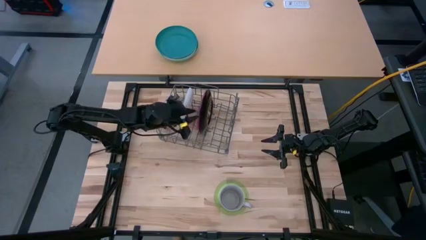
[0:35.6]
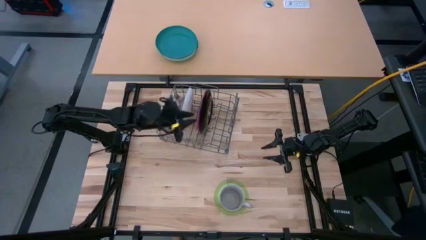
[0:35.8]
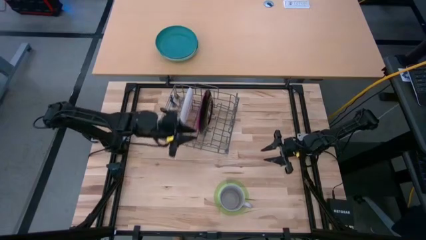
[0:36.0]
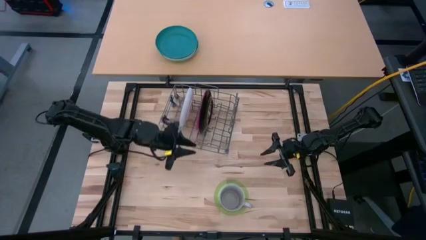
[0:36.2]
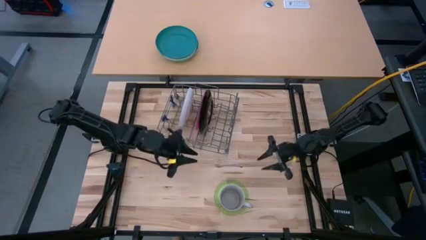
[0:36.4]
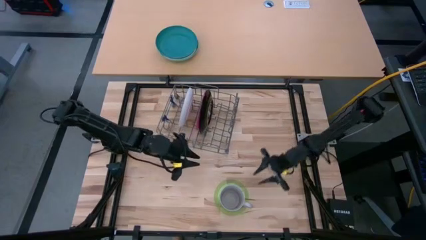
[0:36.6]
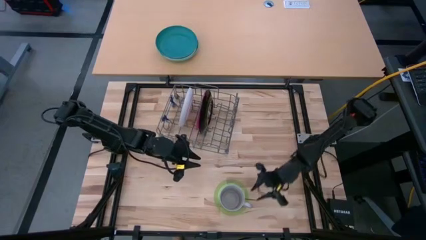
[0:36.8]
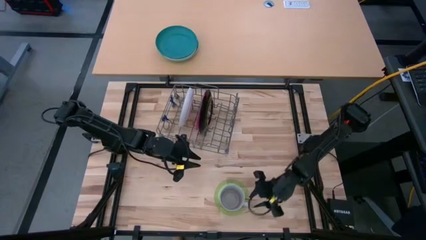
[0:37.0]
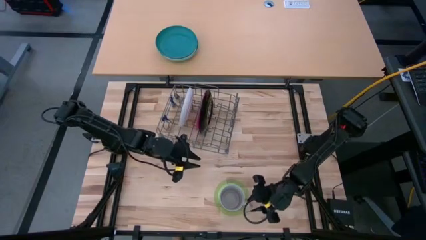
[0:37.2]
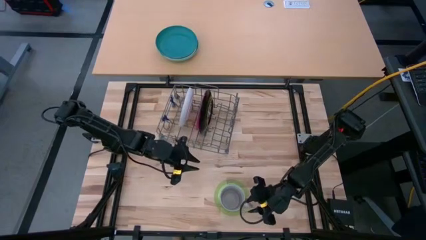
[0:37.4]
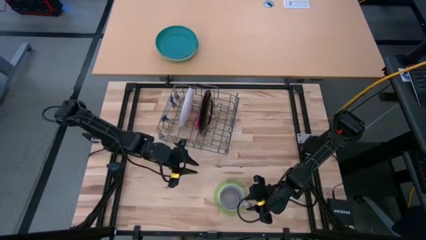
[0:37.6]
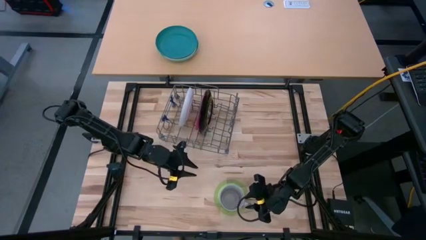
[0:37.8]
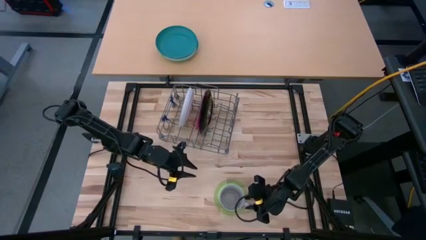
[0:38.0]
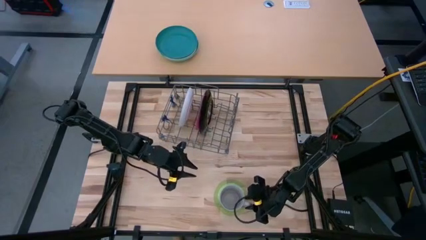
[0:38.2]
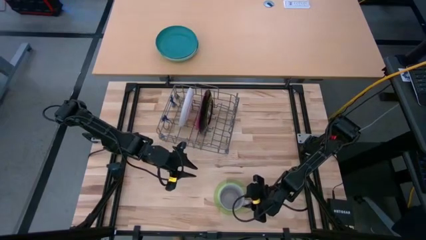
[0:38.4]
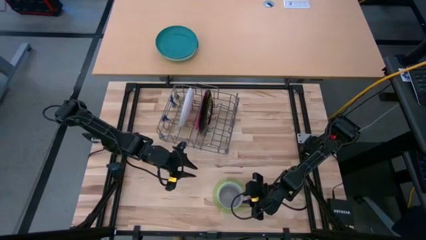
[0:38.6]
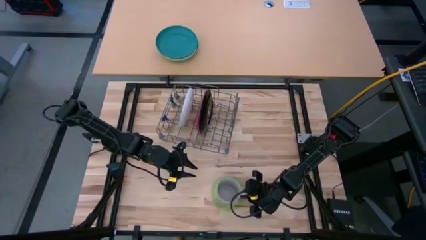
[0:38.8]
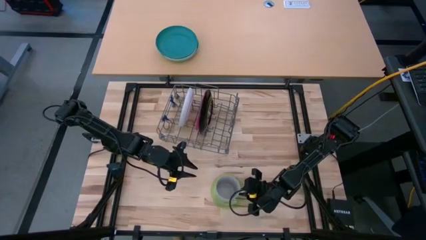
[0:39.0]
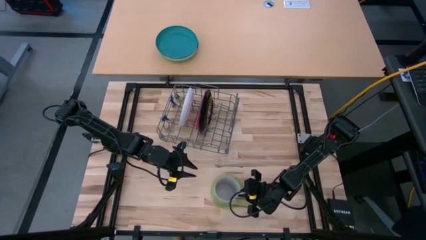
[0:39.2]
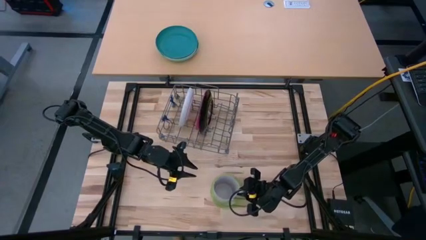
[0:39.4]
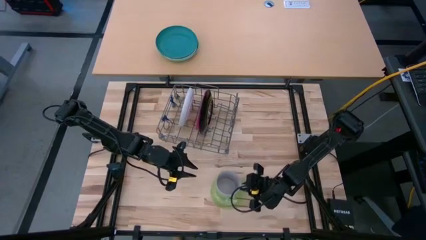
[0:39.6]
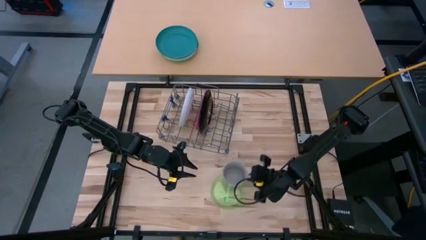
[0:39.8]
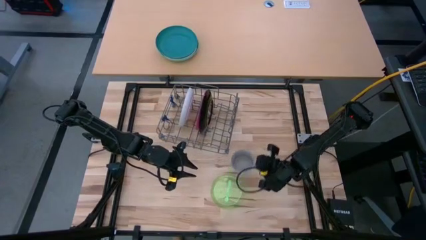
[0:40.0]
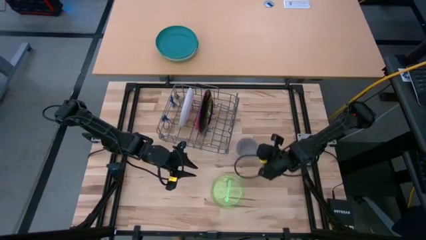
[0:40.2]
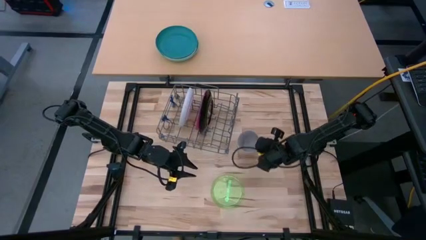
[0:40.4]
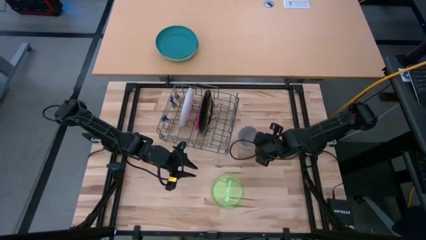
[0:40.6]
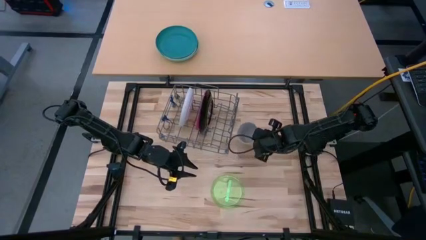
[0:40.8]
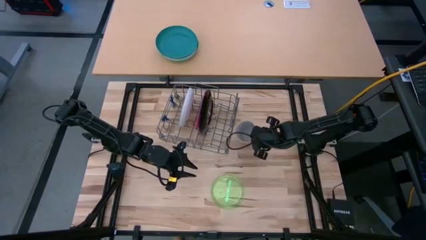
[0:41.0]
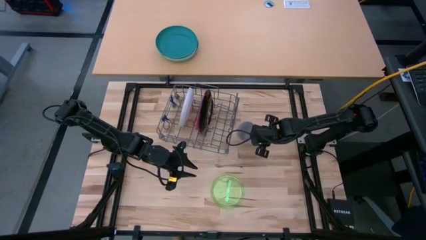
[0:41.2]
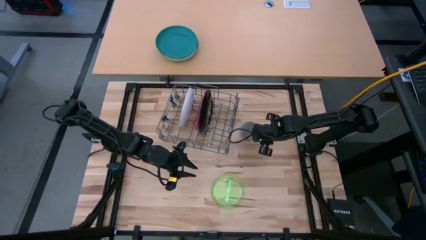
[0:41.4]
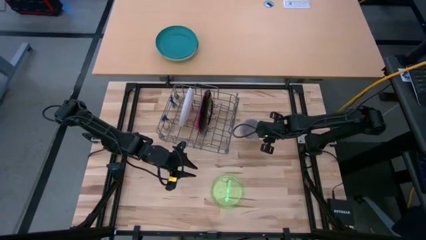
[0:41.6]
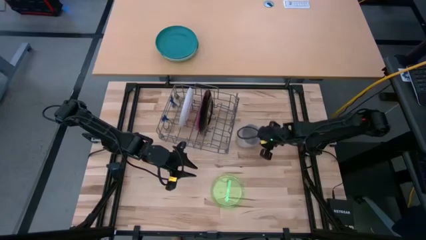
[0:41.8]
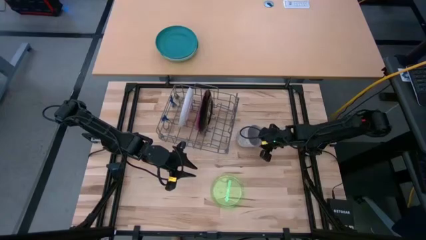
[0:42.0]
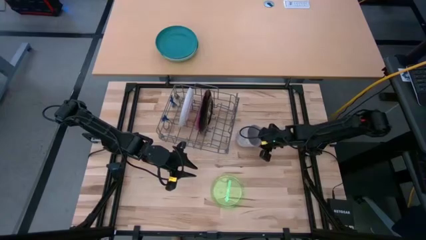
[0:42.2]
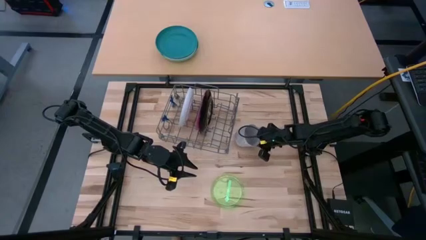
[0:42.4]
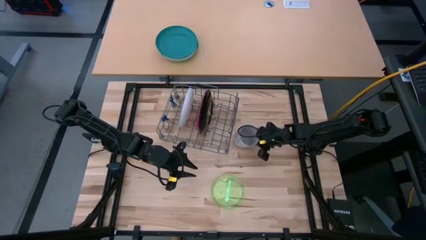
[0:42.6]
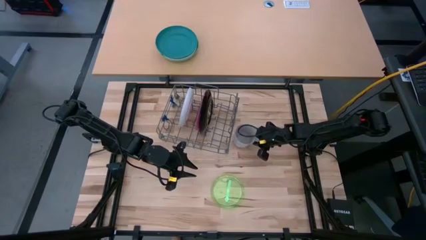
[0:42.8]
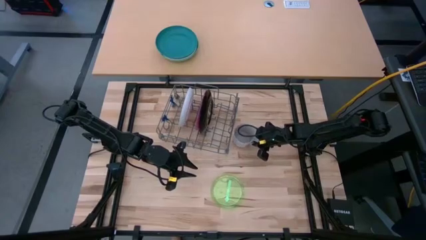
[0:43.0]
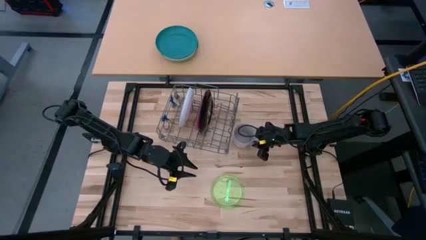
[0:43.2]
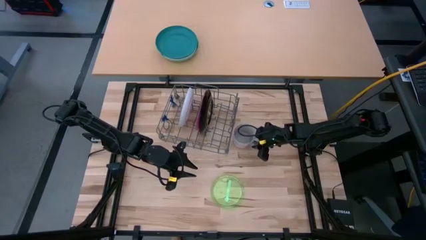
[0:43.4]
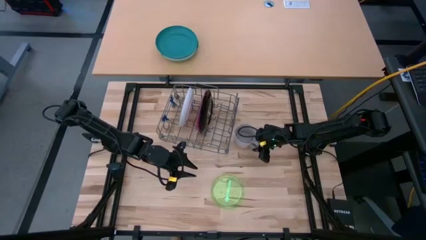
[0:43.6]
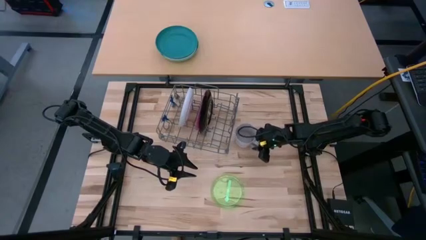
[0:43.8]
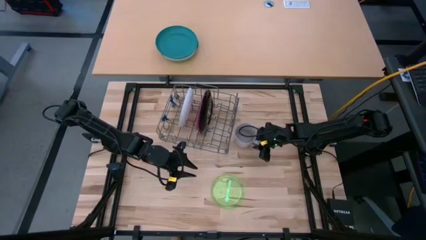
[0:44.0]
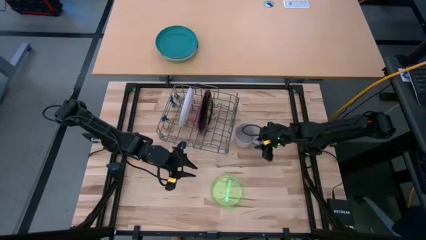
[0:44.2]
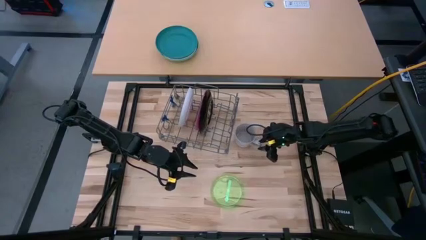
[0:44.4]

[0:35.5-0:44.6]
Task: Sort dishes
Remove the gray mug from the green plate

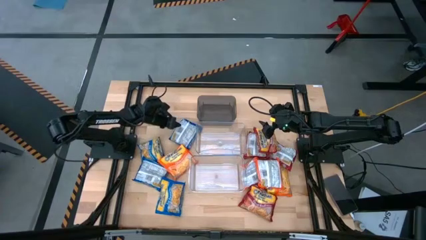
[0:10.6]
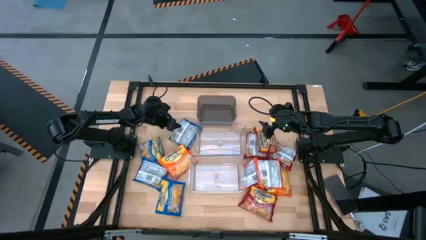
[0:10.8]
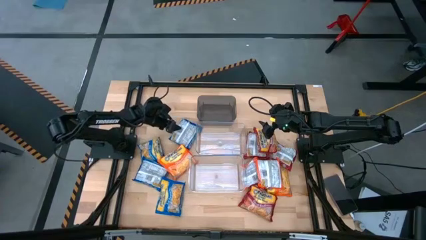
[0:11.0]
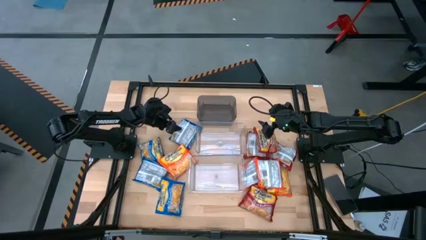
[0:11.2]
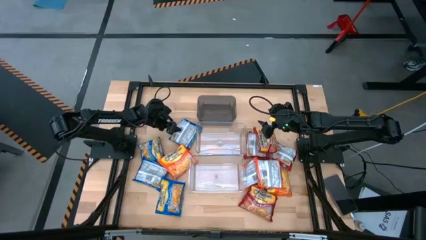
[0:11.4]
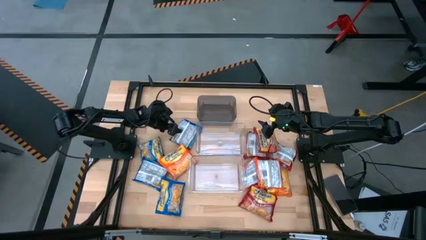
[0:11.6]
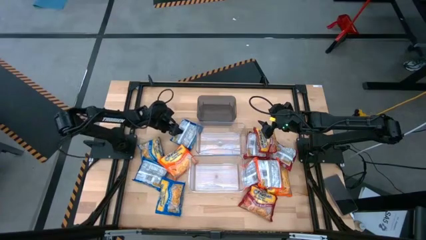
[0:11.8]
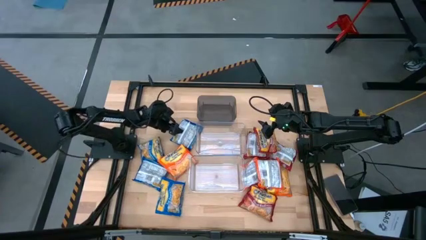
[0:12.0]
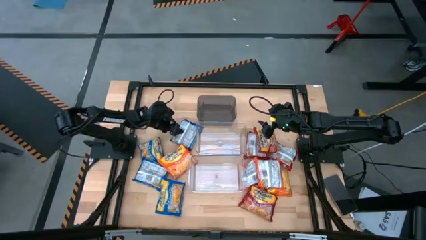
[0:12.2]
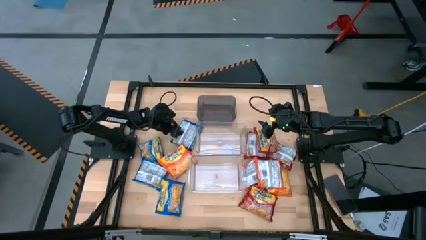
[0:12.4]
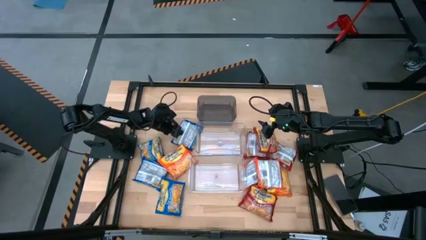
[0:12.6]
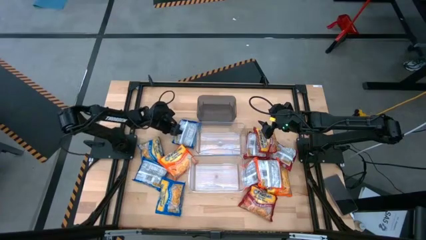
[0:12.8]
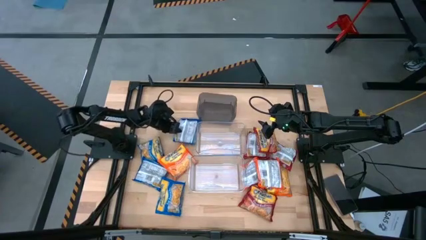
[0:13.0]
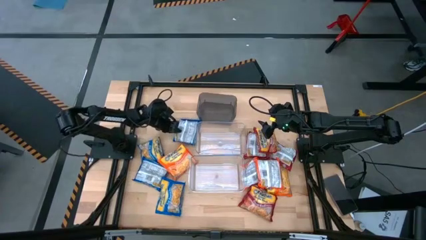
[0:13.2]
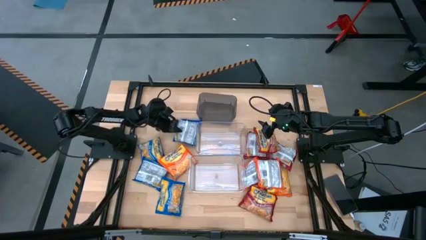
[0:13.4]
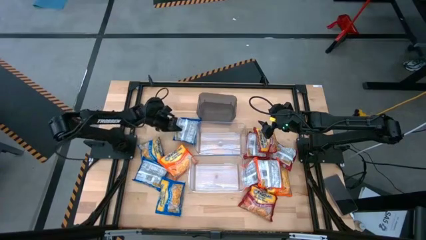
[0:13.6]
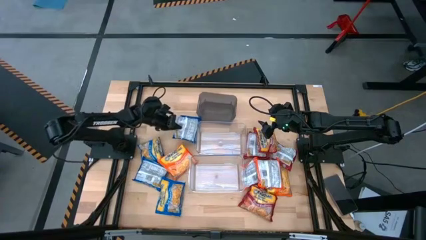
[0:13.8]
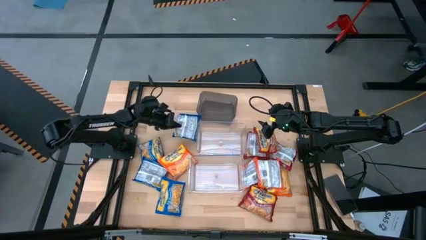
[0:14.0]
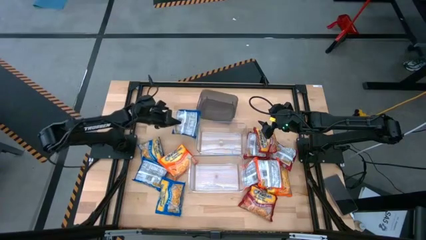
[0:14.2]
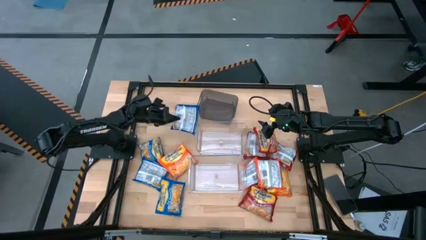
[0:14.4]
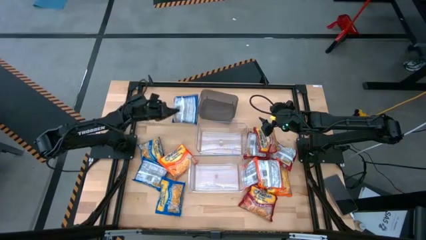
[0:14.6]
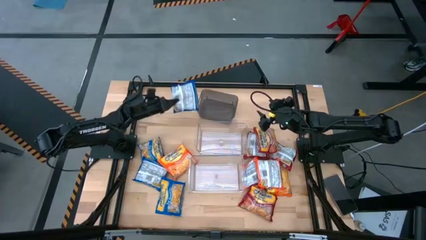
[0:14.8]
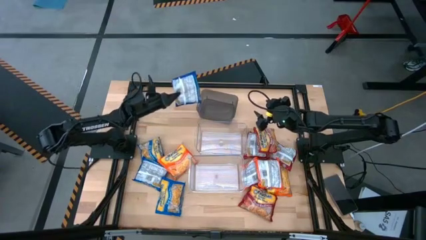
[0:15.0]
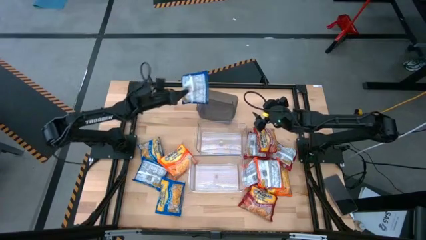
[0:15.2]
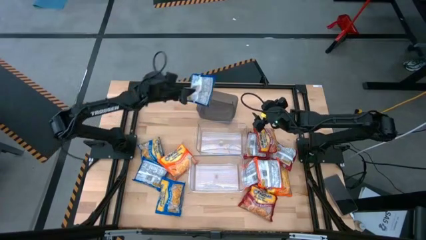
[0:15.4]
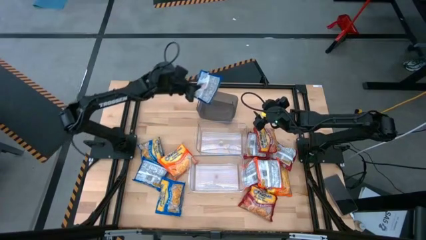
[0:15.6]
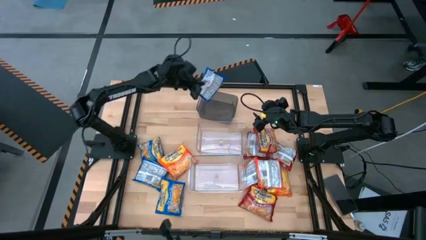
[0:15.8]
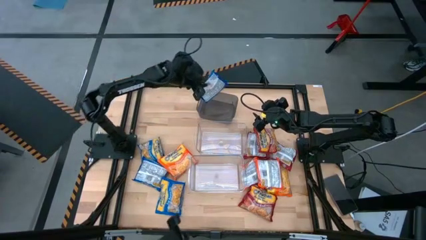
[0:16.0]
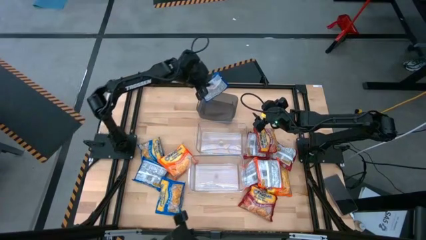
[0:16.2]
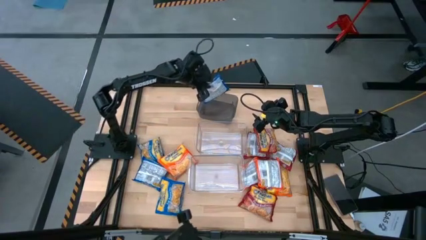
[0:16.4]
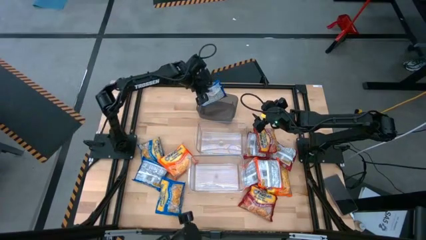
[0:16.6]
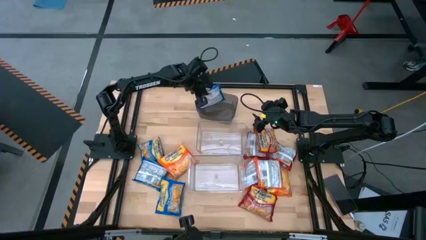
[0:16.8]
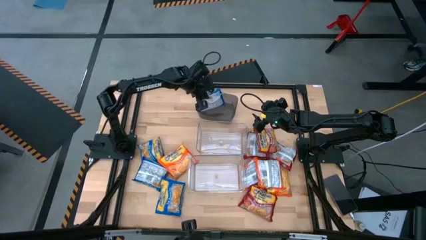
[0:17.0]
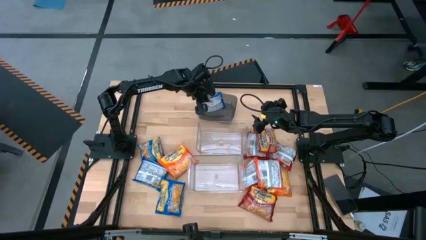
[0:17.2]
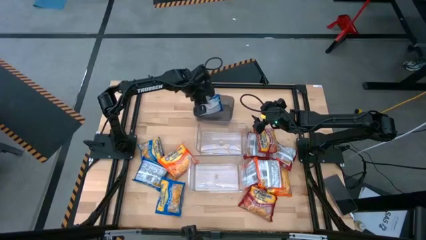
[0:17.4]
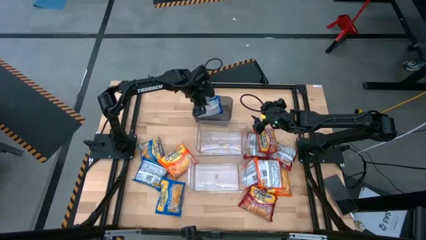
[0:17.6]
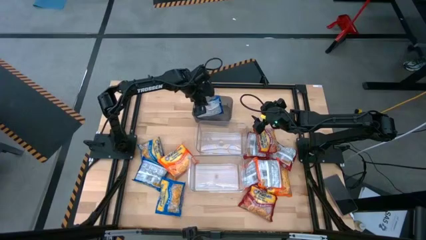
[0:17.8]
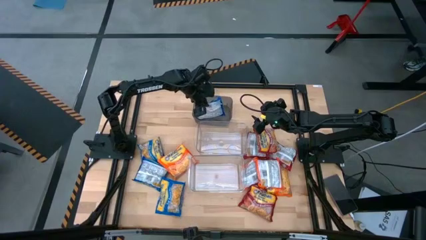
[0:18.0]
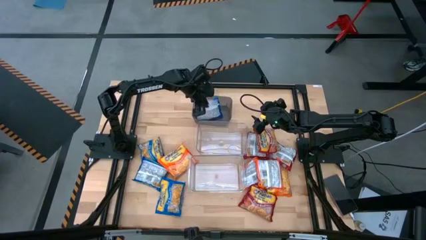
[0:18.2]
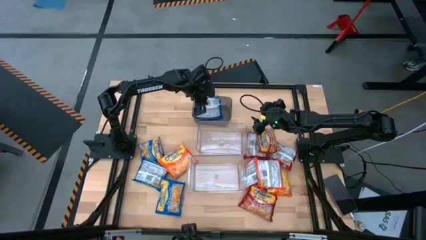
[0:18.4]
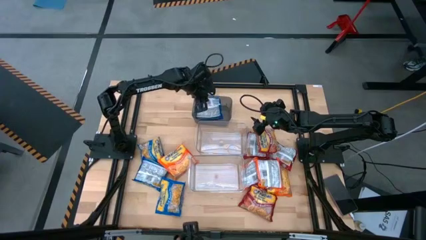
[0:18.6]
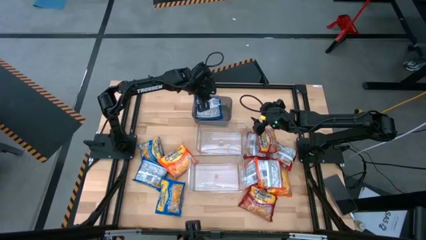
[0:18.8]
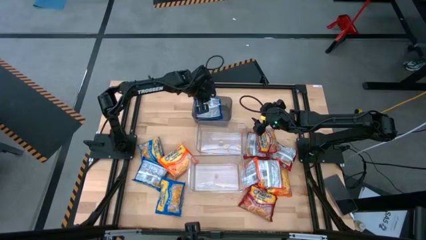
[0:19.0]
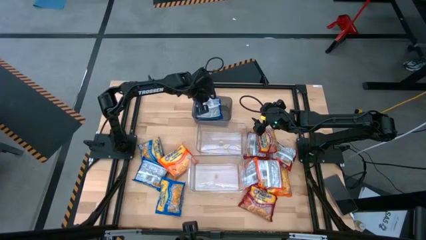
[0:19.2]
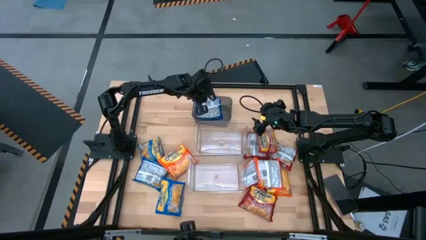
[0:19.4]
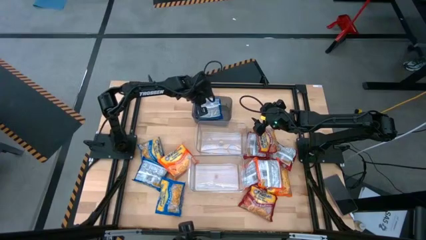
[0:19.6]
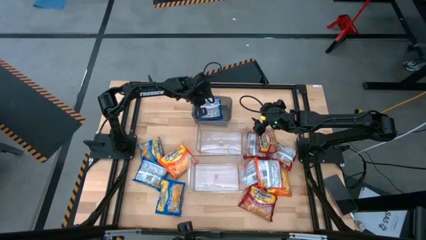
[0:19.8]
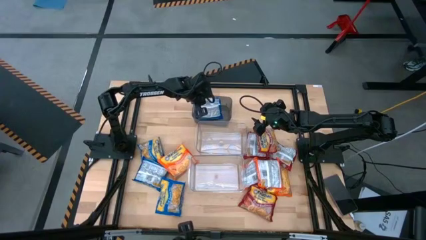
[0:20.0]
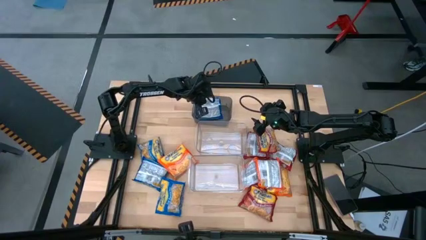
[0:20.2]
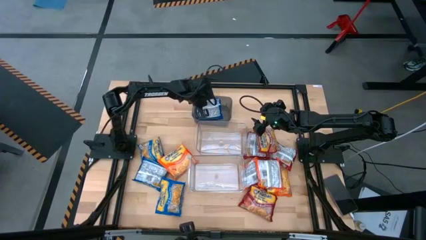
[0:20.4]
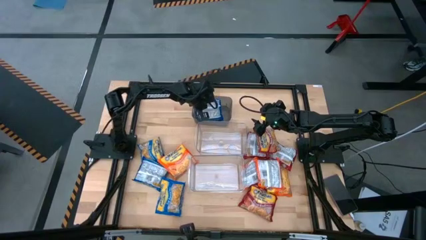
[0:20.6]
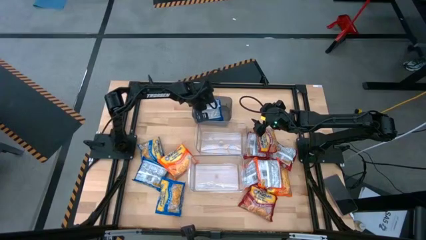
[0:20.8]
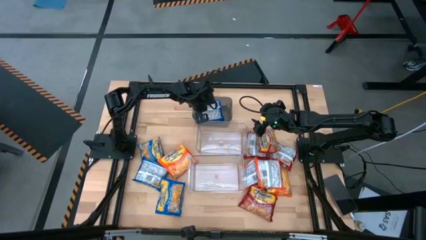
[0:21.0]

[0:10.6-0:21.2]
Task: Sort Maruchan noodles
Put the blue noodle pack into the black bin
